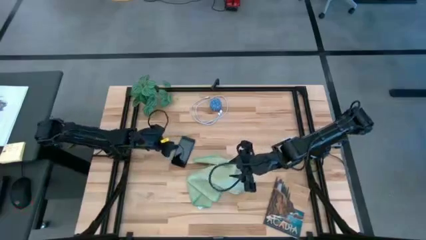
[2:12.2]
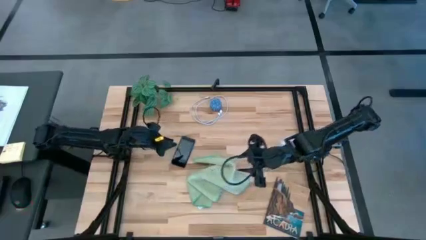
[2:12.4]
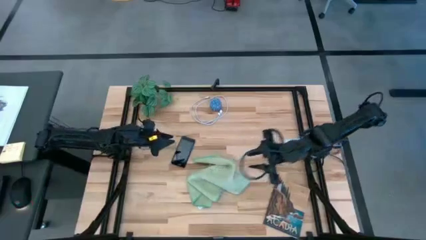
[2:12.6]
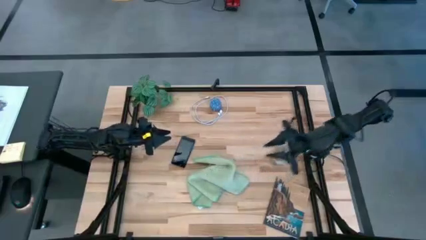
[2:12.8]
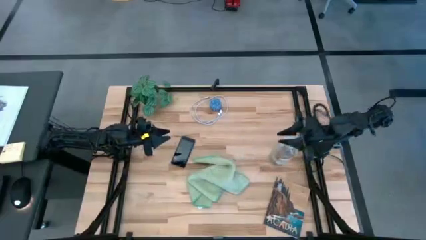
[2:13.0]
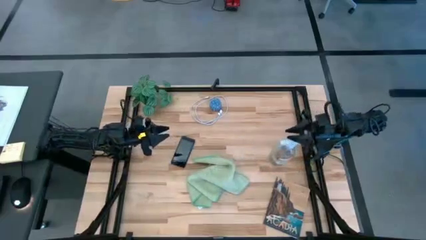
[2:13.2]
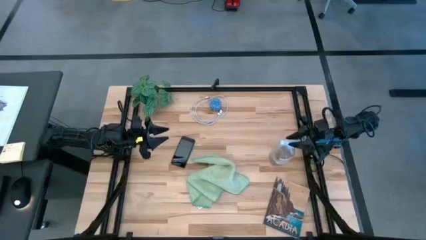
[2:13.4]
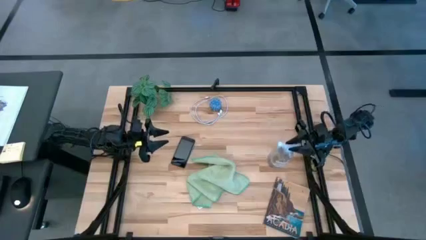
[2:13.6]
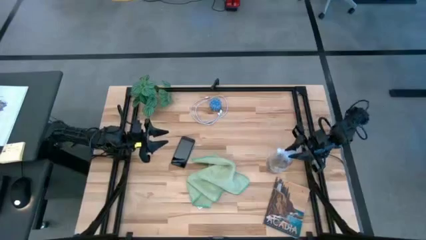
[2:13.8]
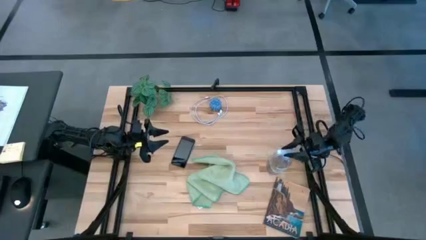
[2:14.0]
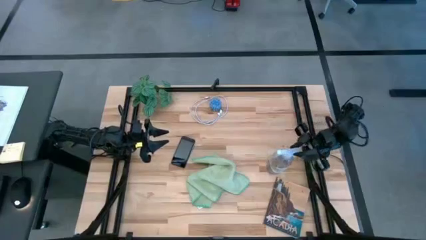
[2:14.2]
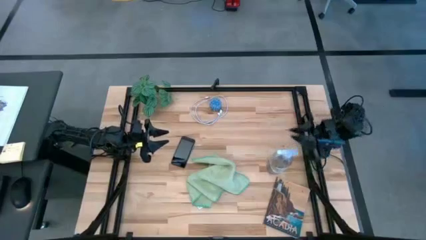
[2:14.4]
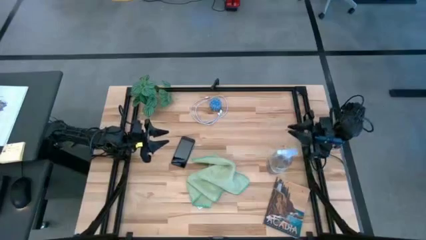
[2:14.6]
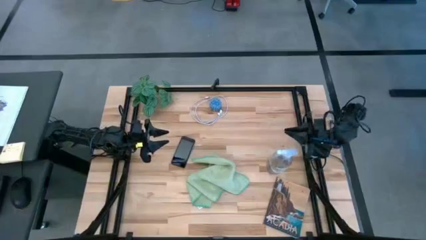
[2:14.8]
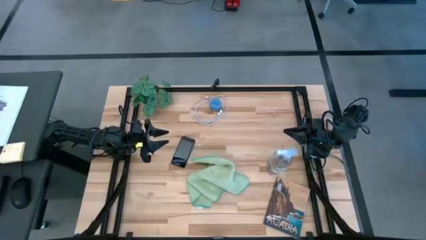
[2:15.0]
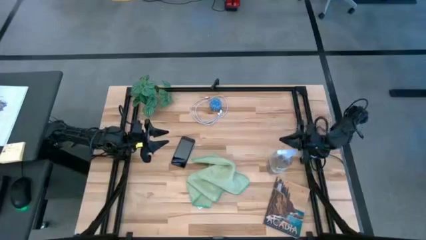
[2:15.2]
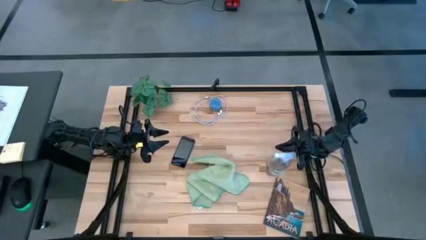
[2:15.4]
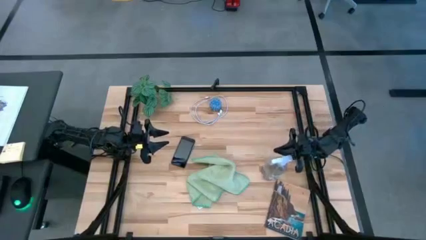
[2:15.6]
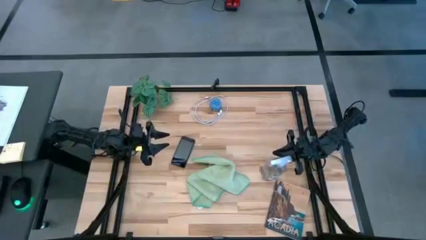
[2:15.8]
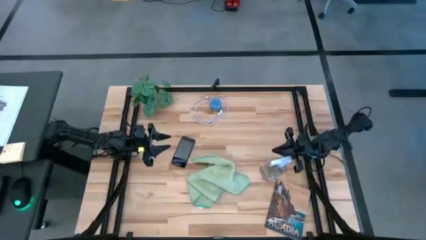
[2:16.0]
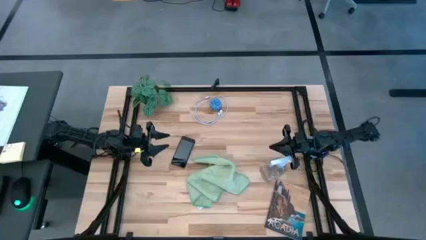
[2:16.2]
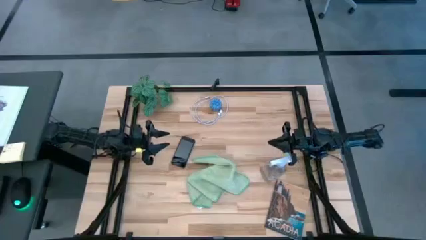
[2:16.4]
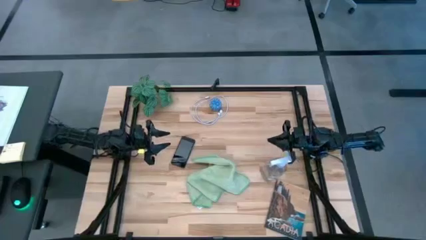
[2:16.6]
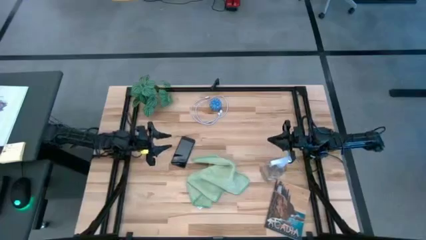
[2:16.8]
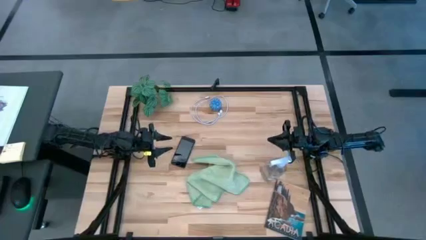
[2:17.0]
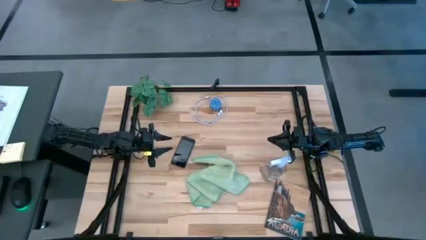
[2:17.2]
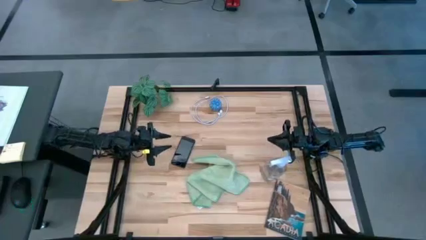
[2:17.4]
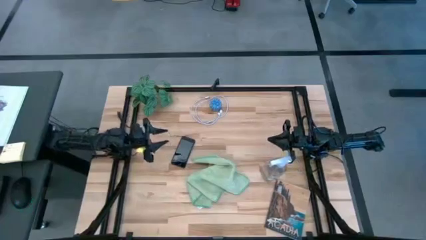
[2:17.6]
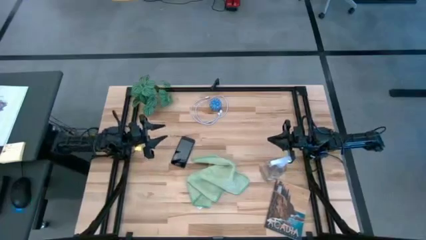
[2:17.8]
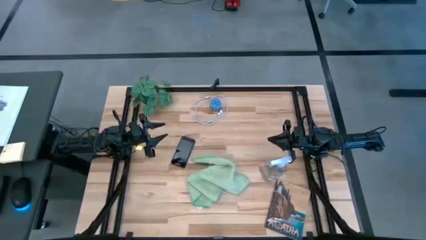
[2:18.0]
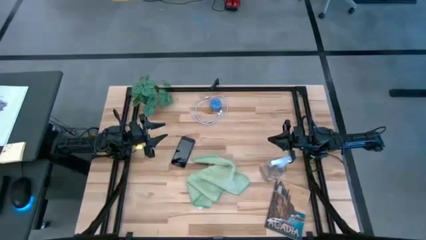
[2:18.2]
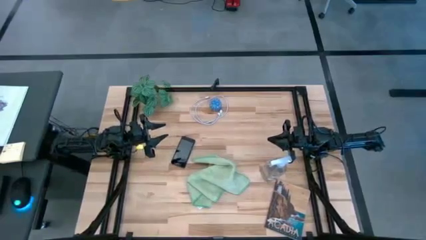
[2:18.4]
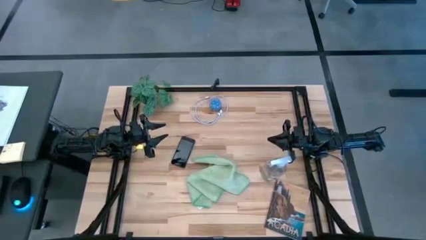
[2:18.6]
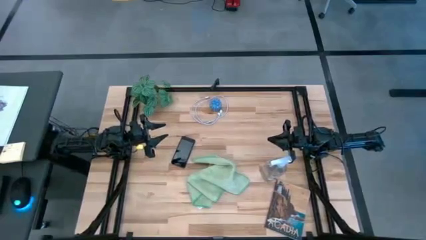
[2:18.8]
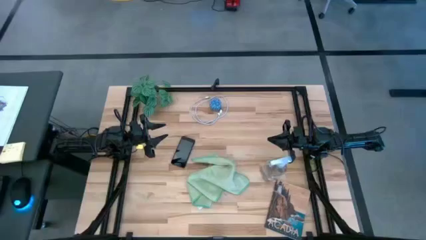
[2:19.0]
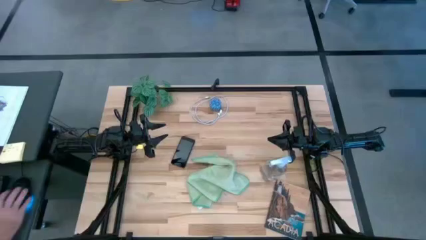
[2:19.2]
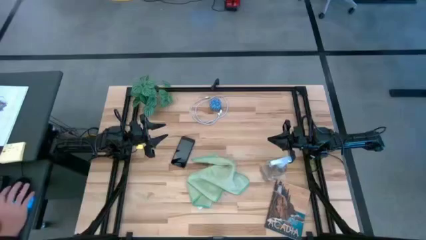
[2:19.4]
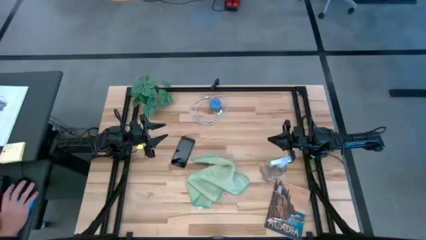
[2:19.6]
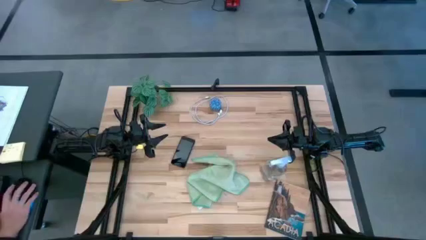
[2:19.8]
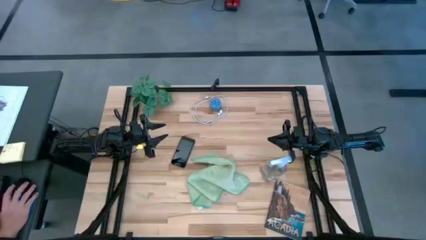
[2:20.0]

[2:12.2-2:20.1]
Task: Apply microfiber cloth
Return to Home Position

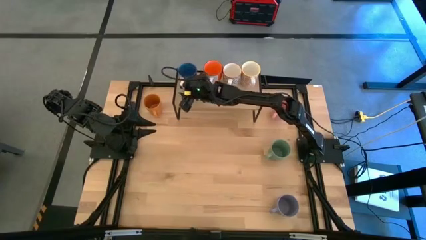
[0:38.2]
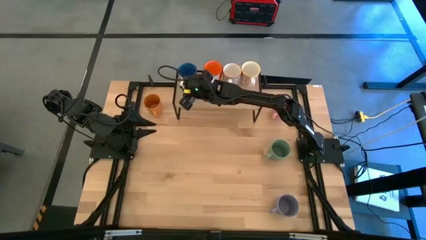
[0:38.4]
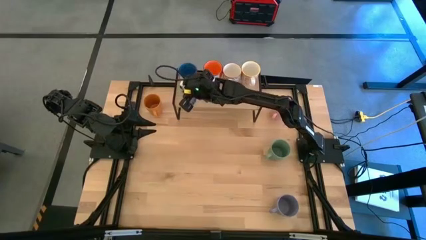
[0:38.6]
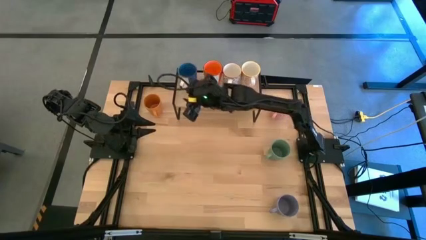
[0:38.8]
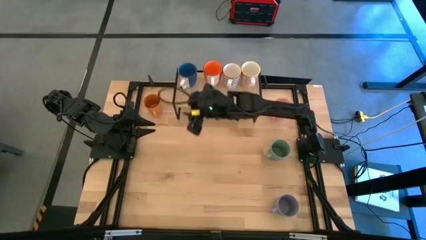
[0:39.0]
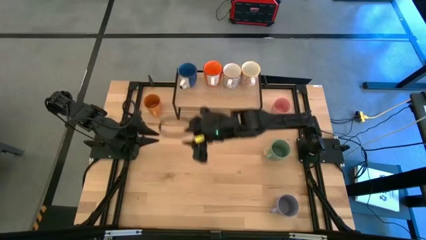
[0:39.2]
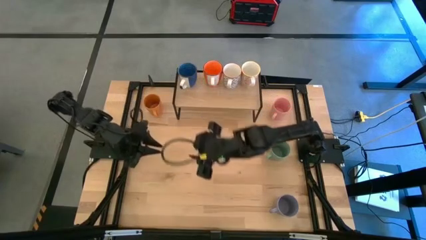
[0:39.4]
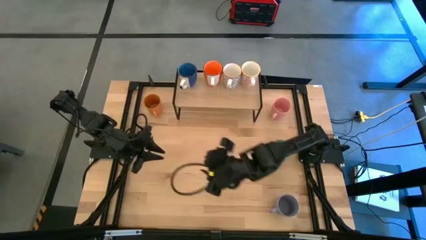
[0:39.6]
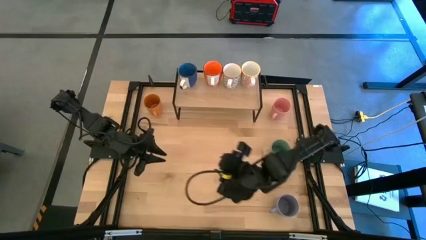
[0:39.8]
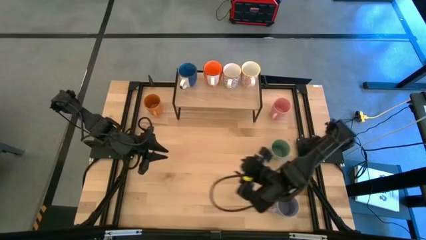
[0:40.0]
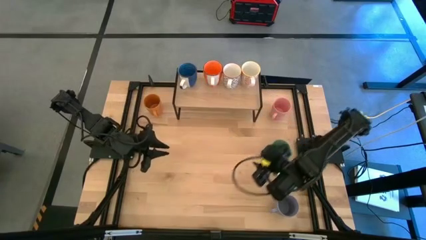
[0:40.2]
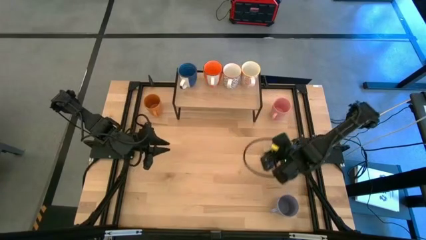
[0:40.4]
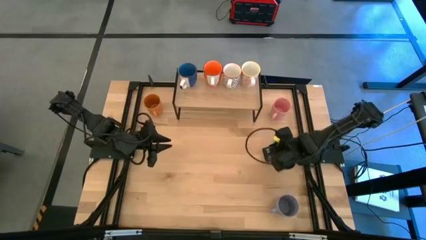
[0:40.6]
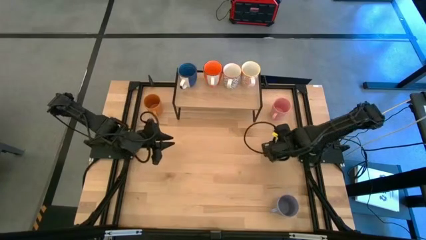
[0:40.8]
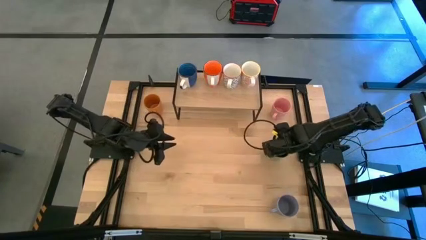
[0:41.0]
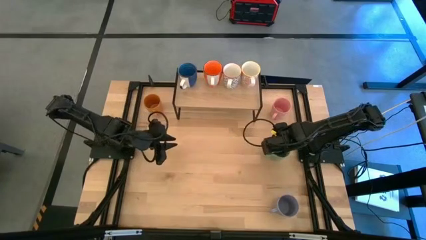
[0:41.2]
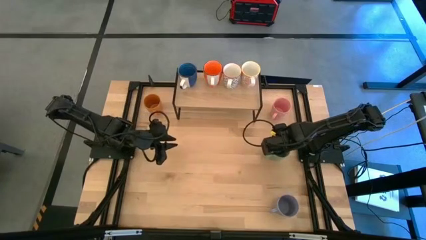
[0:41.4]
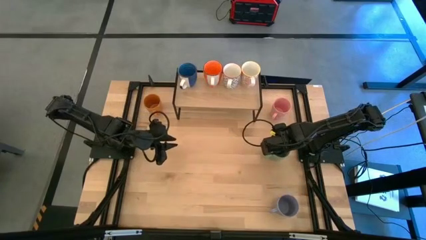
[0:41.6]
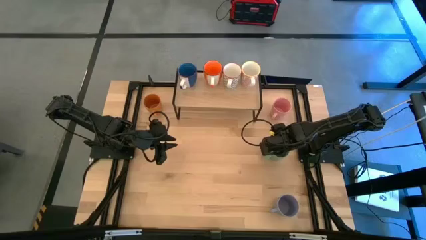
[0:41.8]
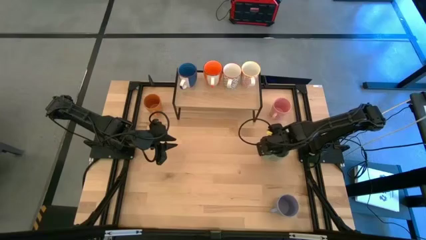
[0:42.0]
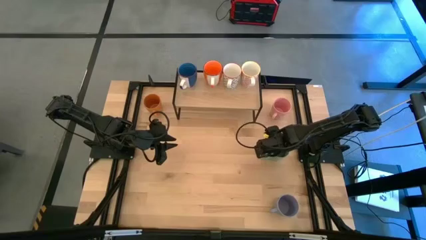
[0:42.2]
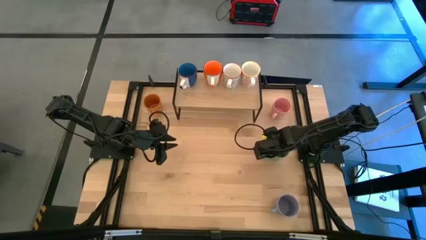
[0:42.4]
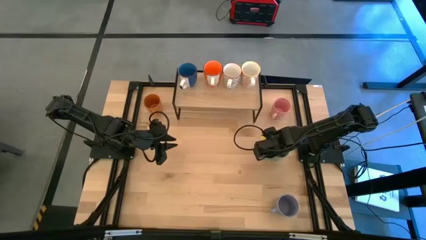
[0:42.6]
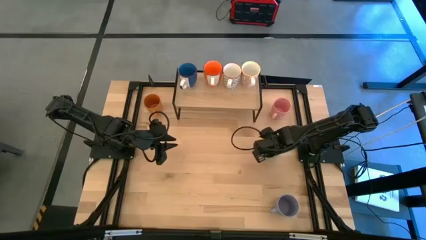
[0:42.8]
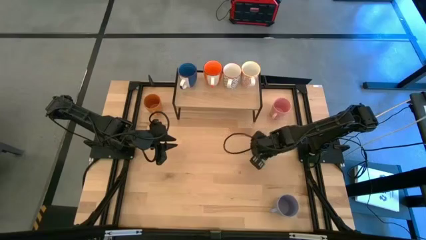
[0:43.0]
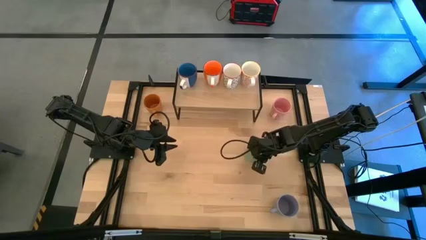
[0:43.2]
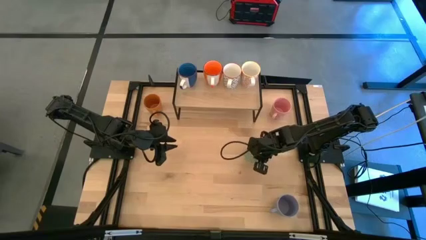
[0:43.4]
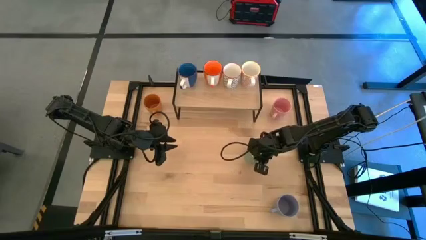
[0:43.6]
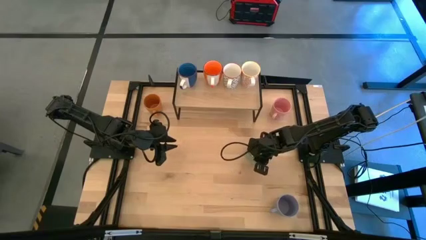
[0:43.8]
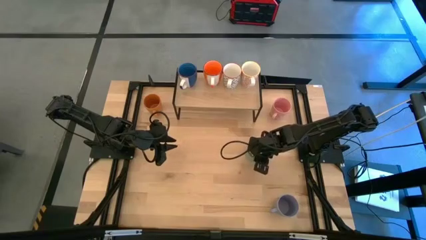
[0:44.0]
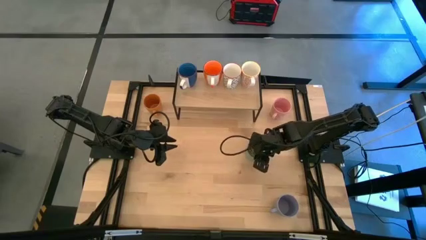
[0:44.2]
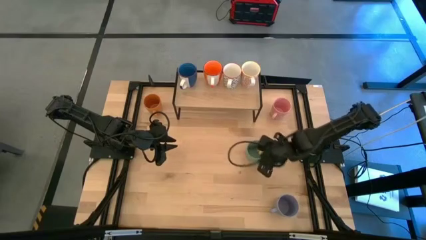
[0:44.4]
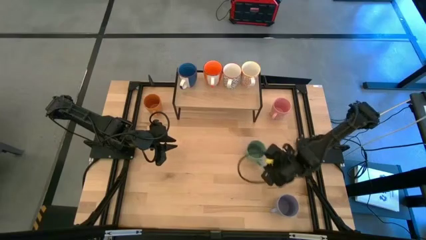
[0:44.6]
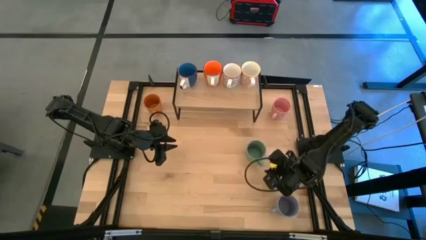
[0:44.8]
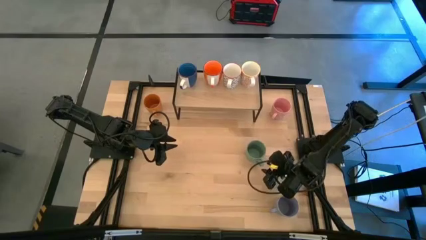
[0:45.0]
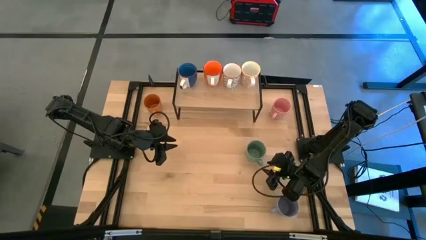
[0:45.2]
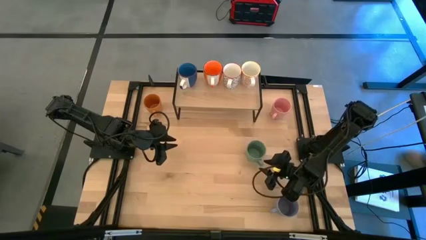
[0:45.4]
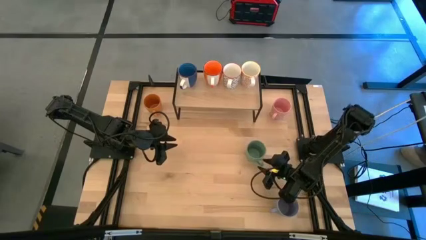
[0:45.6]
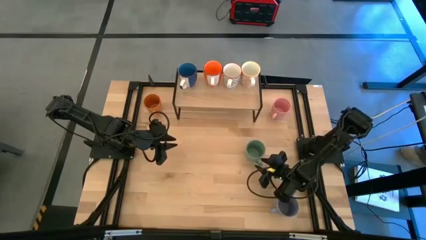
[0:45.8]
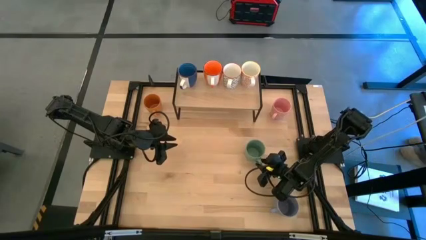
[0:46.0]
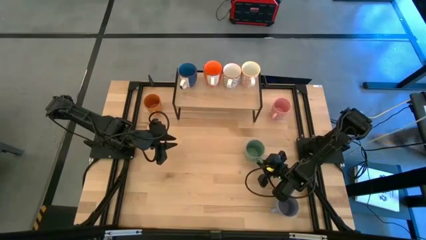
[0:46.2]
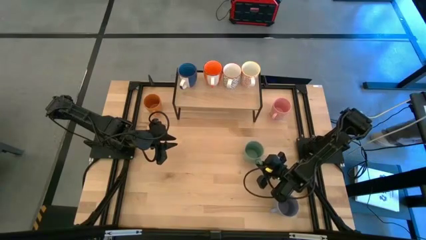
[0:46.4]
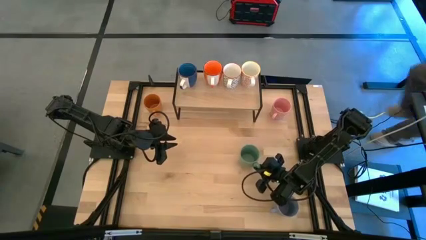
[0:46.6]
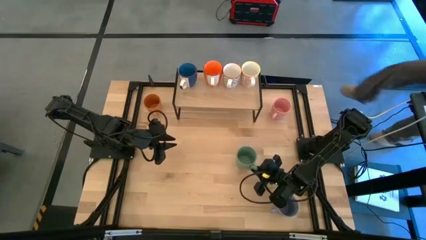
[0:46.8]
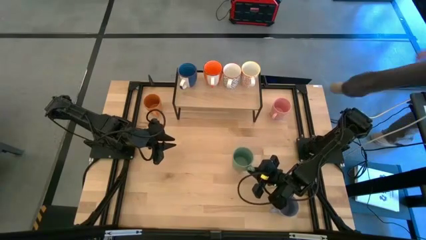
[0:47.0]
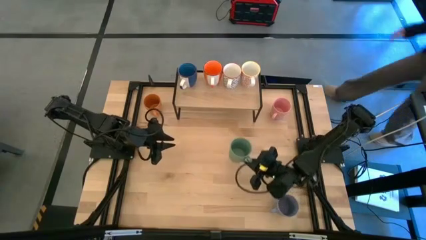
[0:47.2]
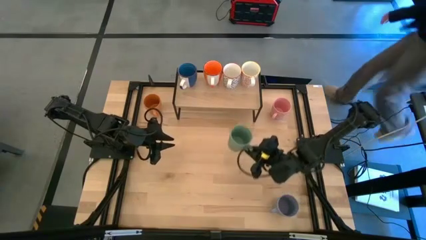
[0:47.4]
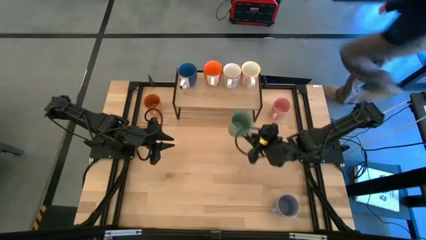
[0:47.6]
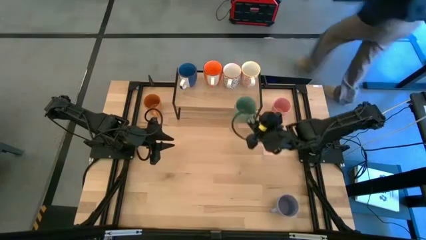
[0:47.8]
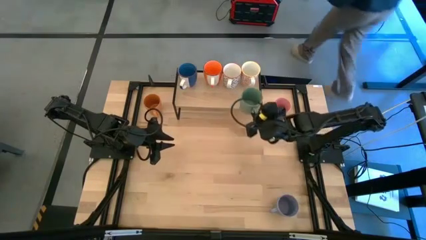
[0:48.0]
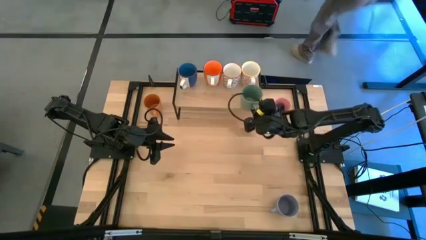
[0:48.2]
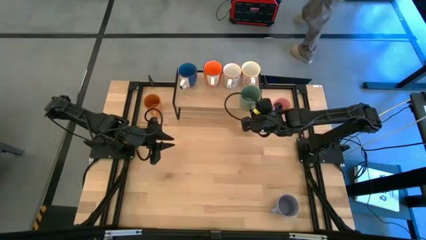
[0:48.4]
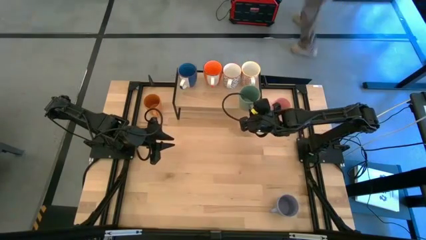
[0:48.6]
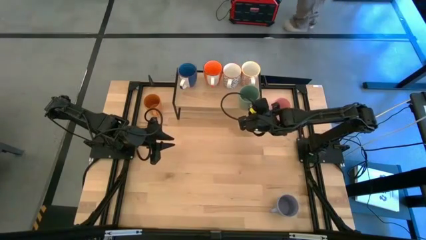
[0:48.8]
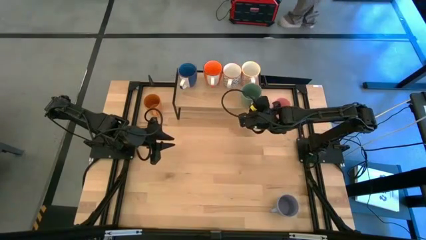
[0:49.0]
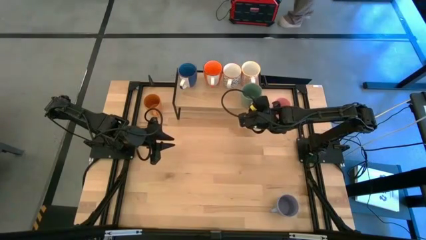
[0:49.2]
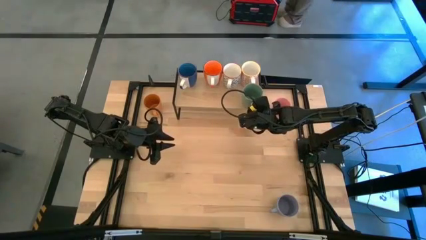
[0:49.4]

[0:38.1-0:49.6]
Task: Place coffee mugs
Put the green mug on the shelf
